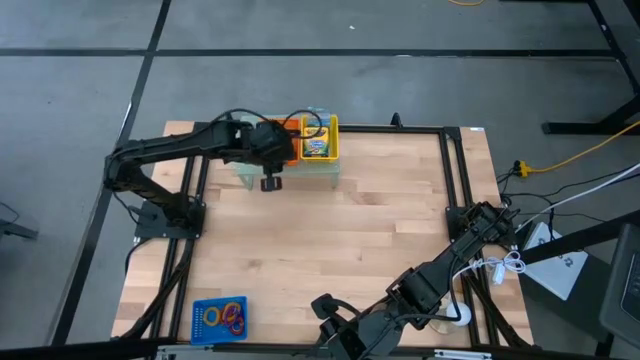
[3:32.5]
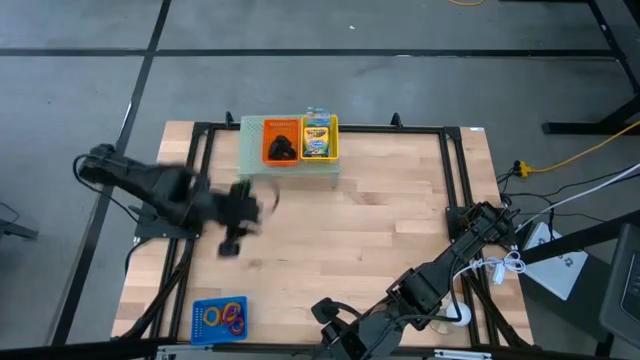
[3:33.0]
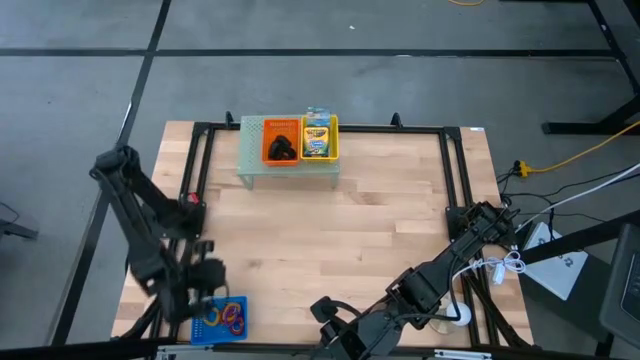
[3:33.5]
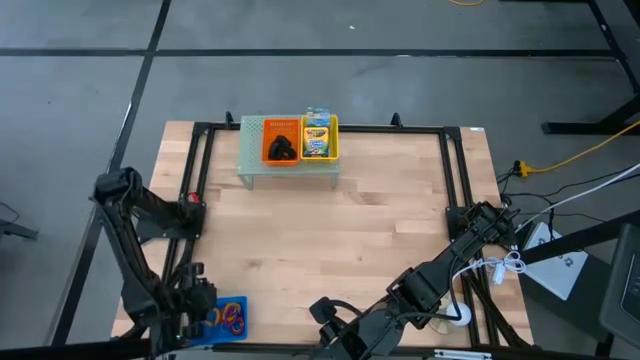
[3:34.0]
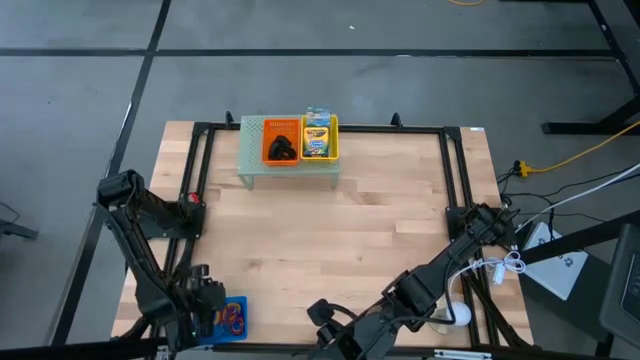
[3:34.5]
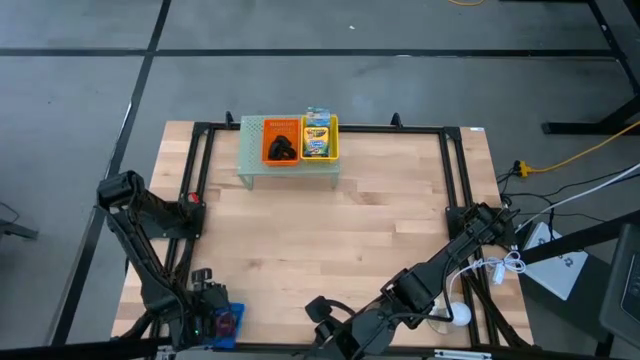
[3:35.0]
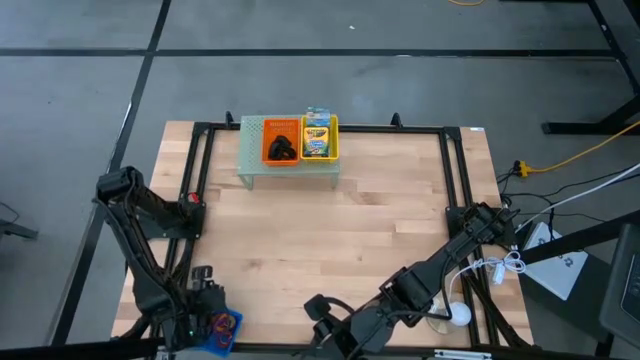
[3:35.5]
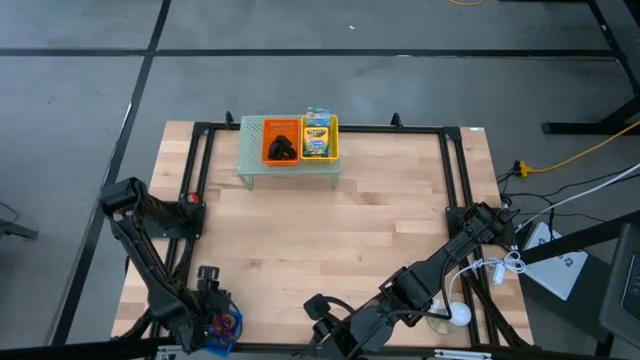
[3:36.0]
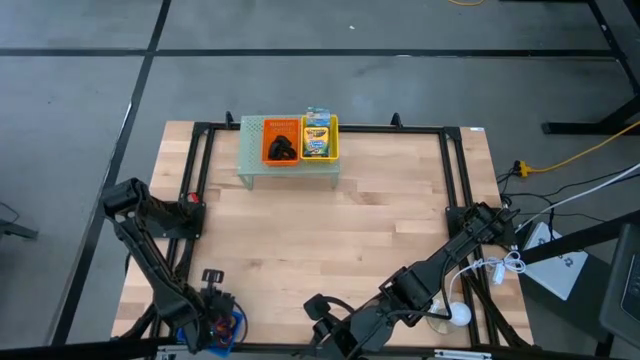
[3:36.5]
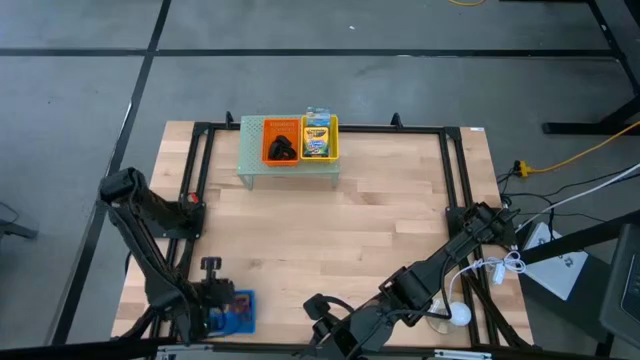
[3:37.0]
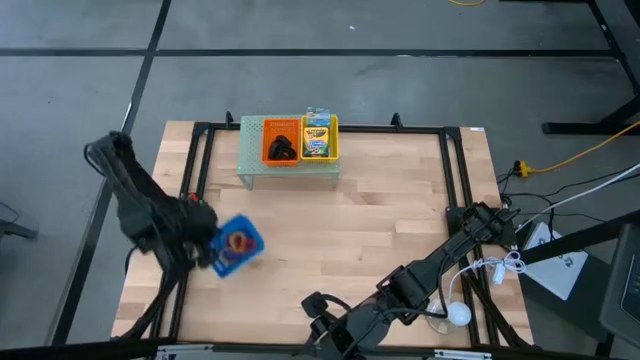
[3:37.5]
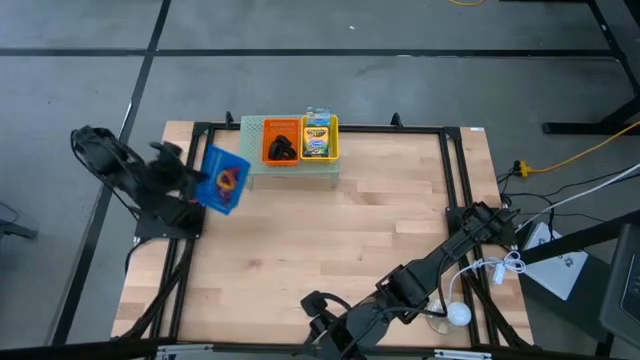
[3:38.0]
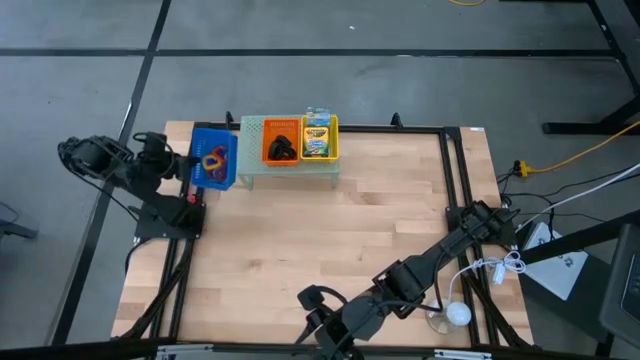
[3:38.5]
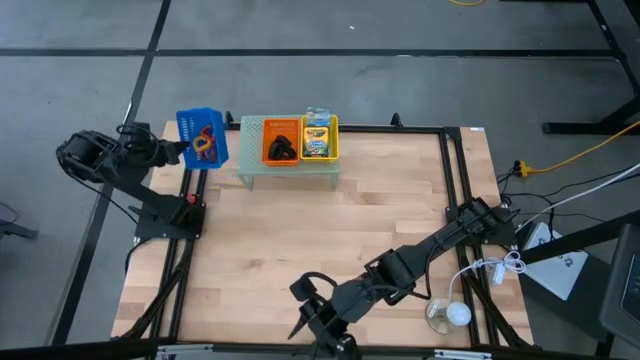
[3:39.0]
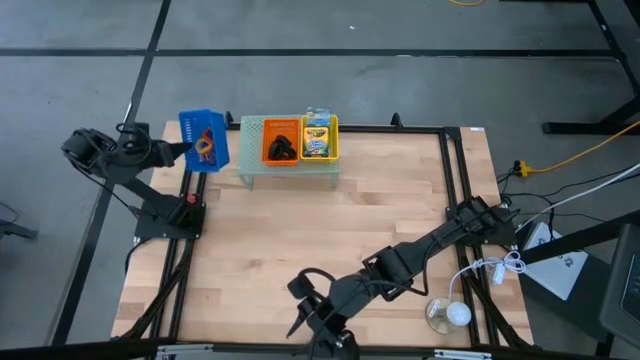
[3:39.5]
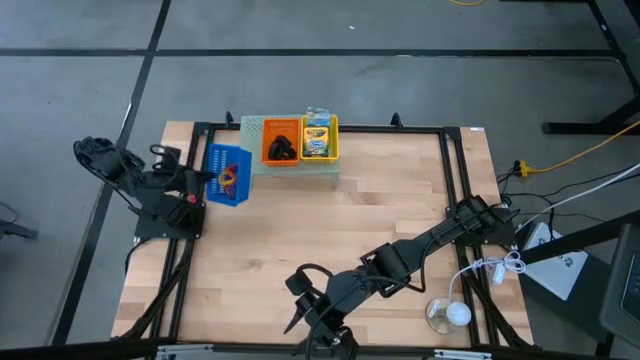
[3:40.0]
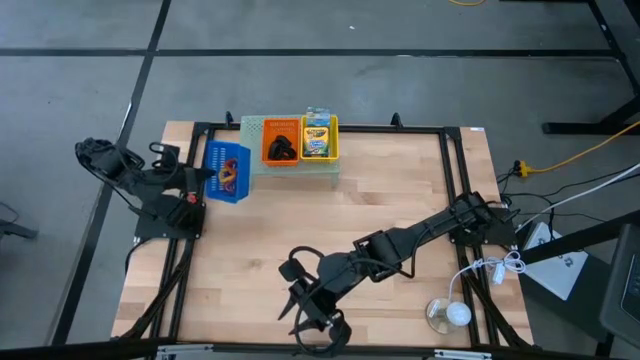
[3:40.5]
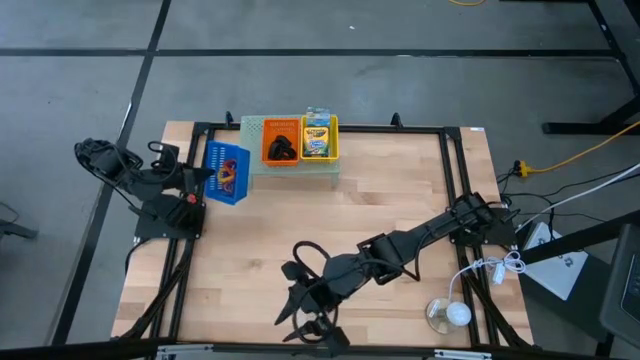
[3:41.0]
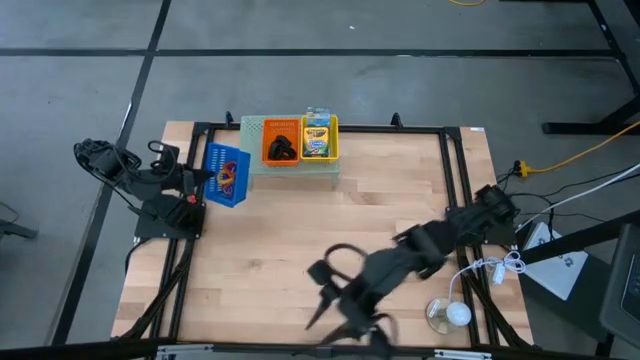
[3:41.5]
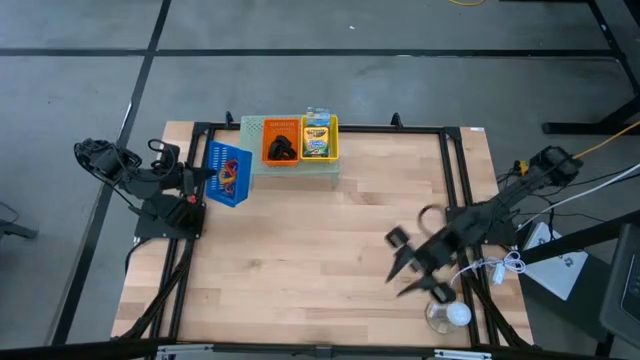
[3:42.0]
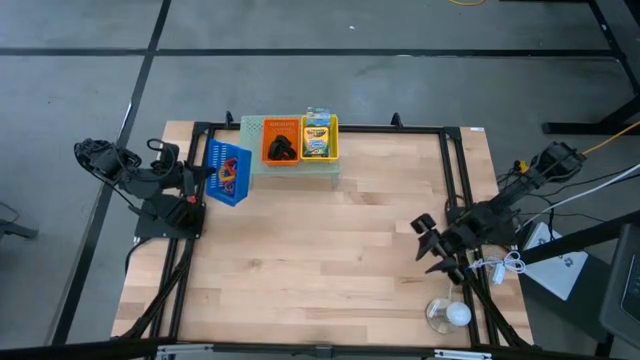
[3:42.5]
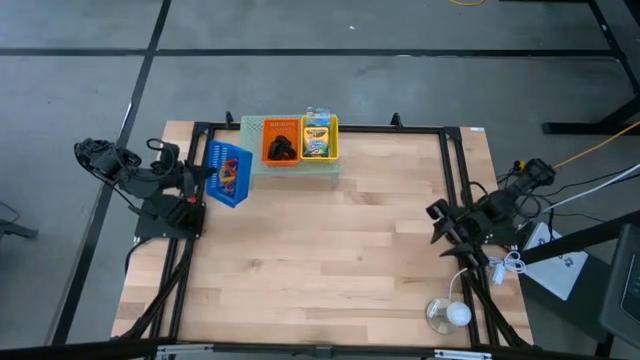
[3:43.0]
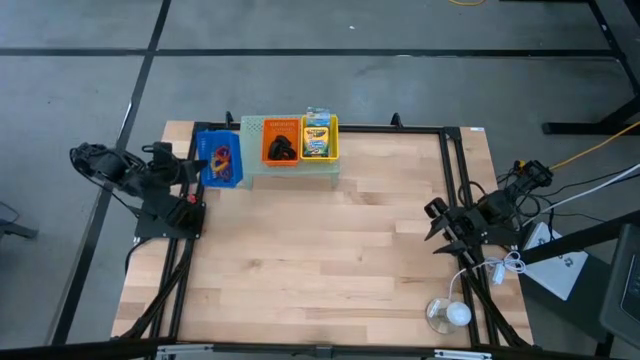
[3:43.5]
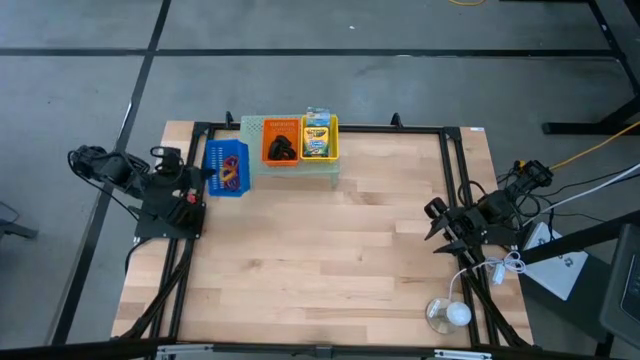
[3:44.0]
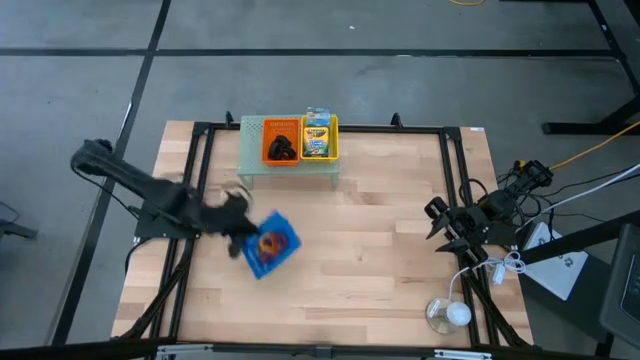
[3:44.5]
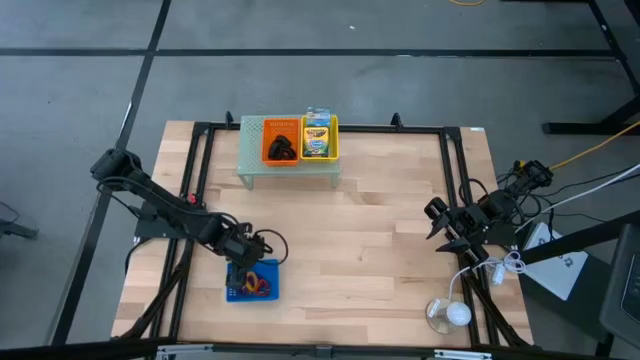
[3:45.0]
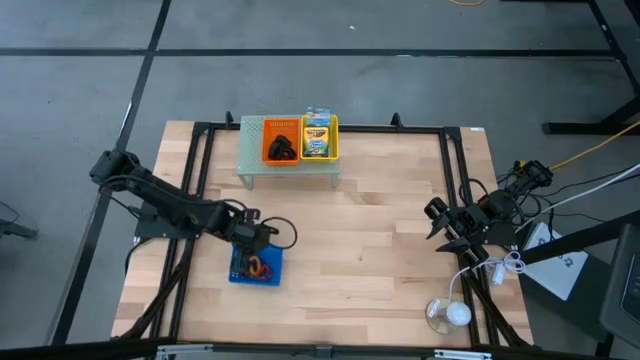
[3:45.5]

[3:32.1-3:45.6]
Task: Pick & Place Office Desk Supplies
Put the blue bin on the shelf

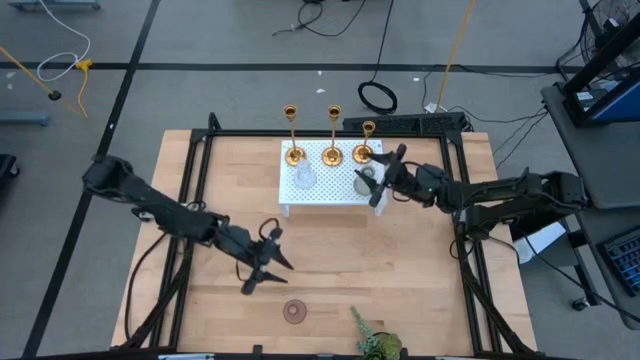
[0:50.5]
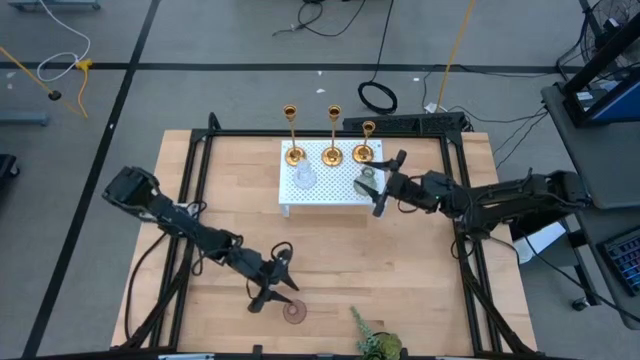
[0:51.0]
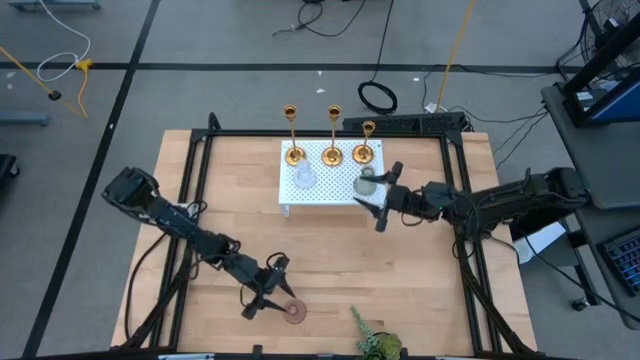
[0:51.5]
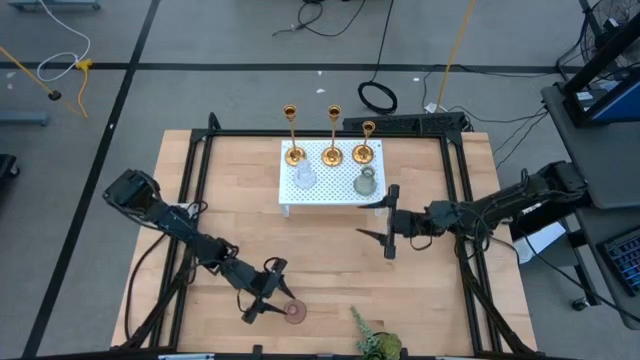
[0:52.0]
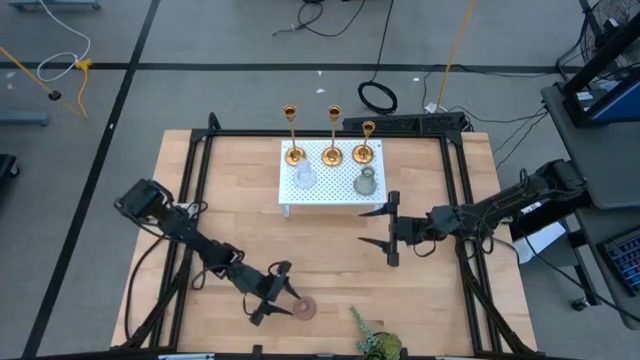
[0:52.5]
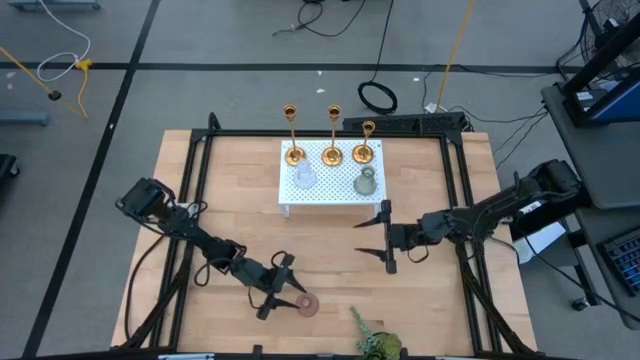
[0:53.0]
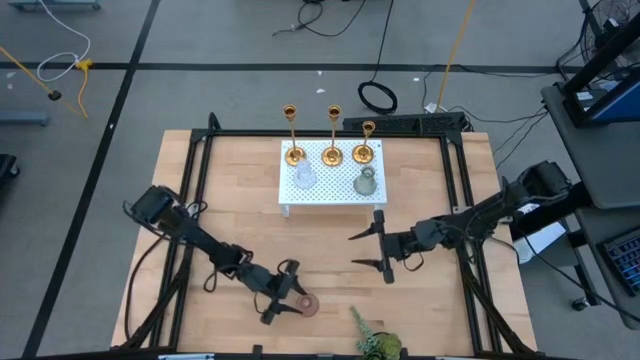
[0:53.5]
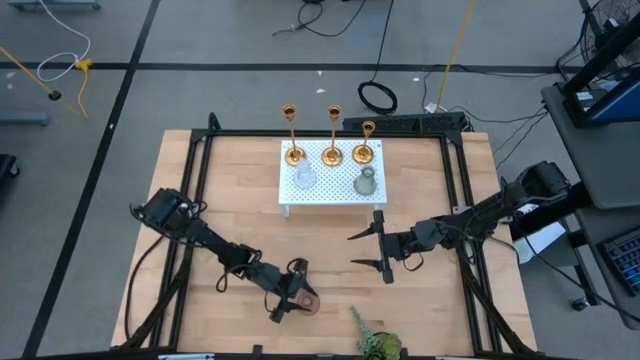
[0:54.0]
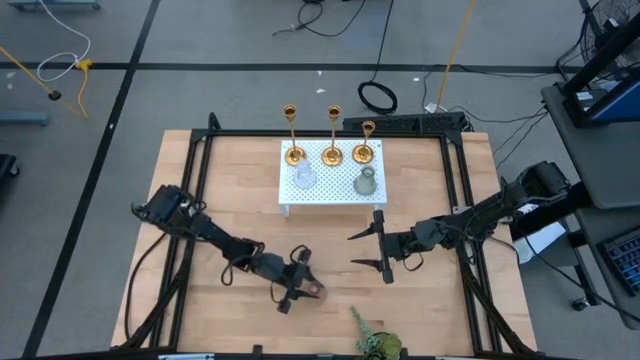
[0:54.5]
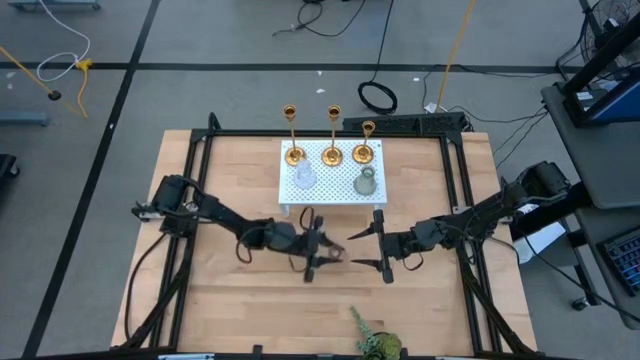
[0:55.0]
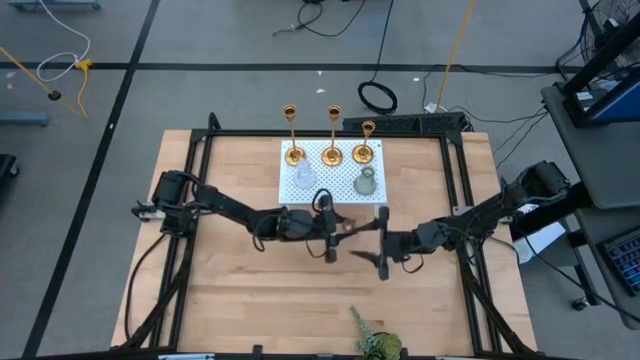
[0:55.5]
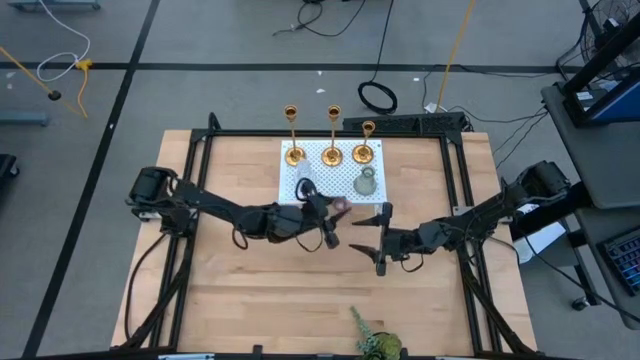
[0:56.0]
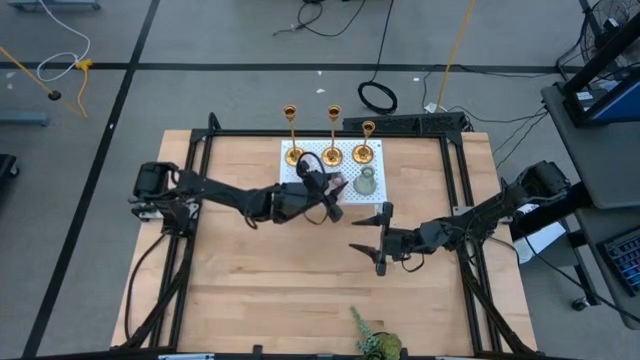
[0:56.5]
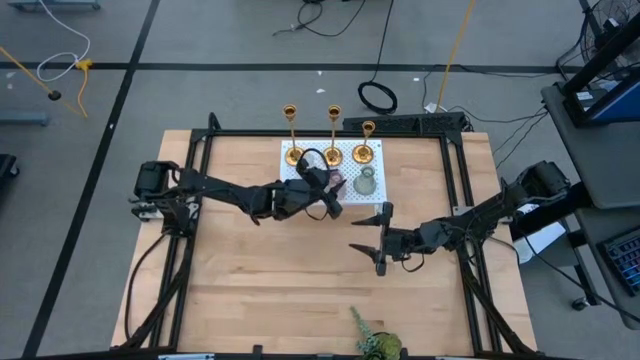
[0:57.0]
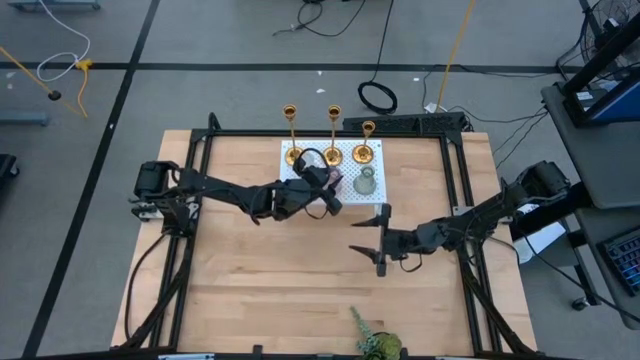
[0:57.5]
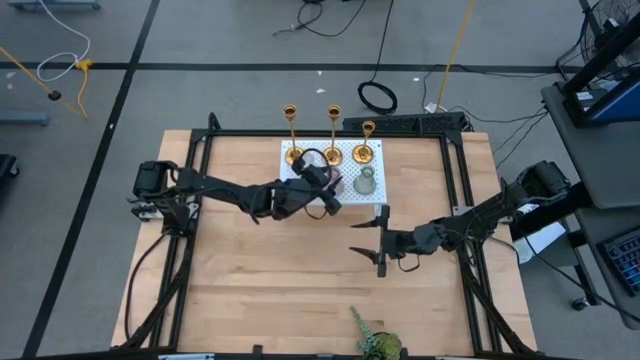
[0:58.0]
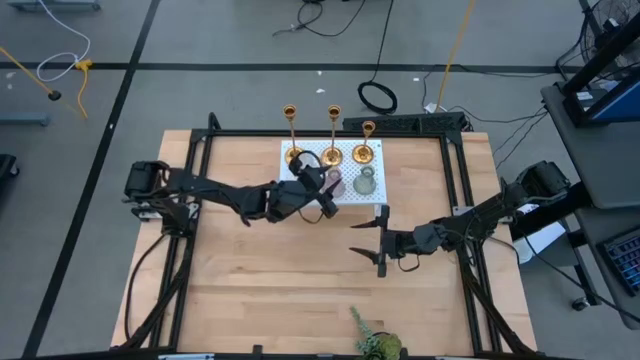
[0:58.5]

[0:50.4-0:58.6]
Task: Pick & Place candle stick holders
Put the pink glass candle holder on the shelf
